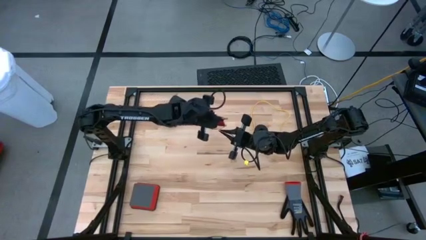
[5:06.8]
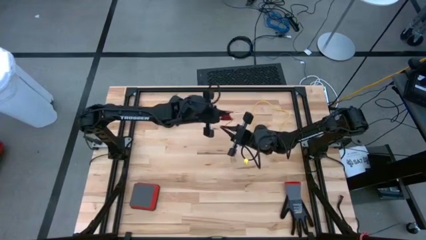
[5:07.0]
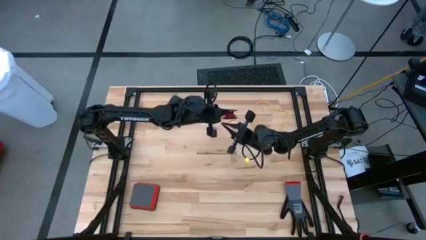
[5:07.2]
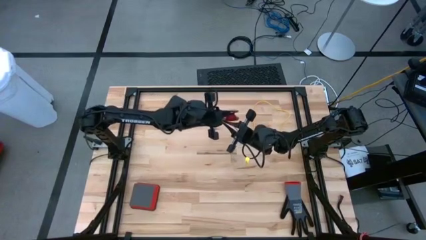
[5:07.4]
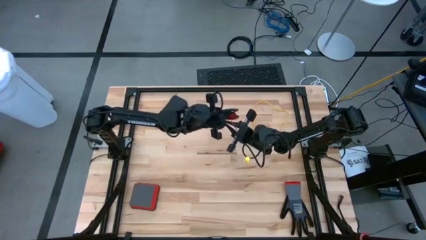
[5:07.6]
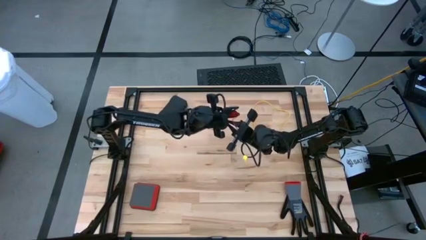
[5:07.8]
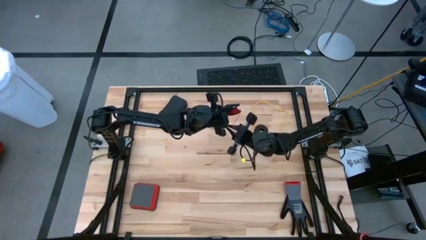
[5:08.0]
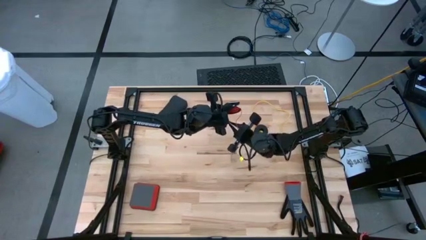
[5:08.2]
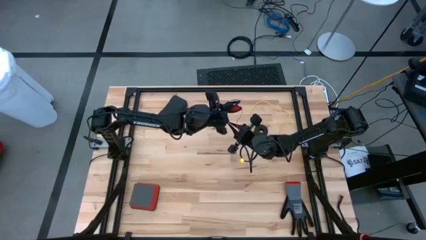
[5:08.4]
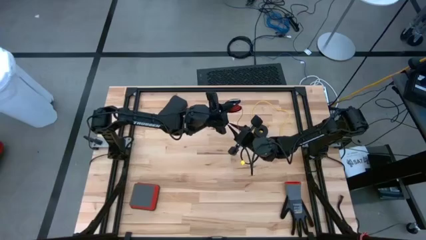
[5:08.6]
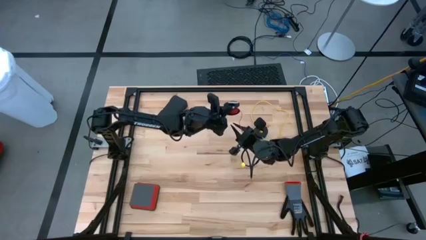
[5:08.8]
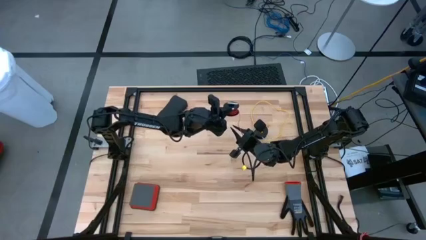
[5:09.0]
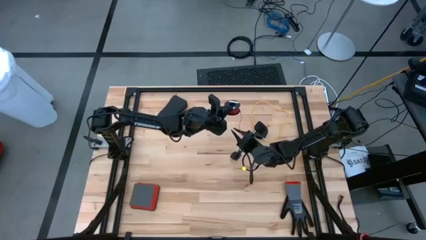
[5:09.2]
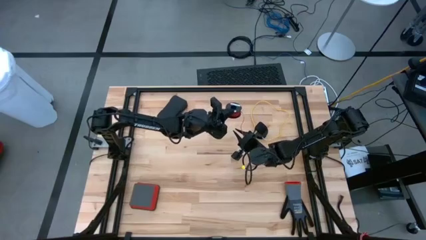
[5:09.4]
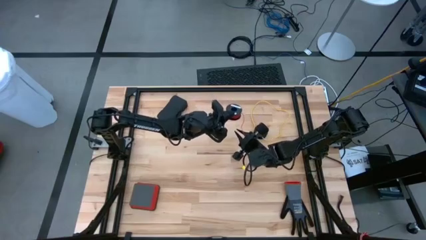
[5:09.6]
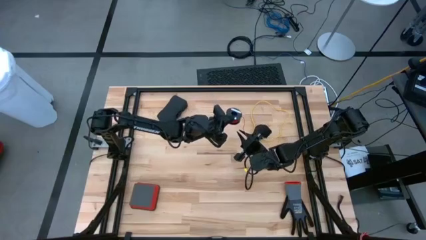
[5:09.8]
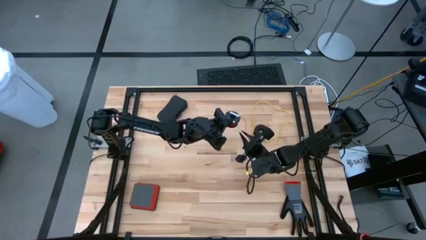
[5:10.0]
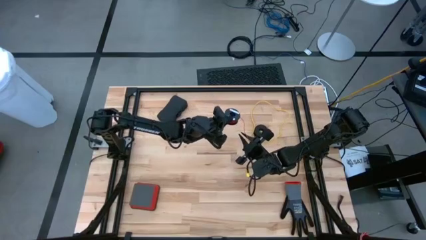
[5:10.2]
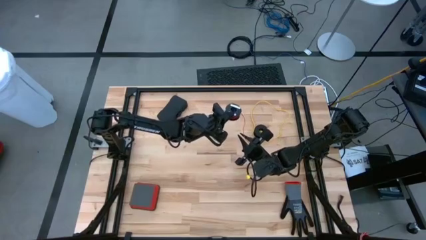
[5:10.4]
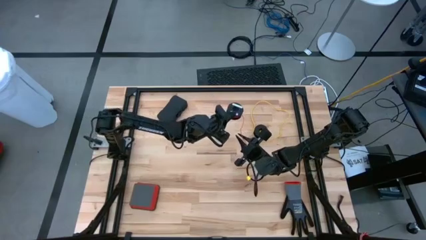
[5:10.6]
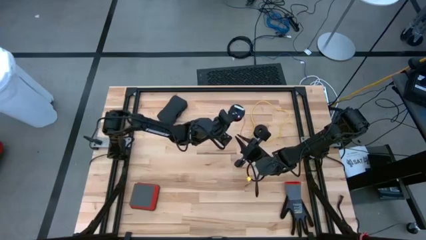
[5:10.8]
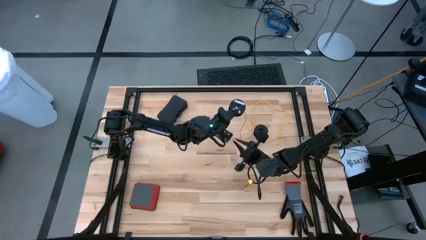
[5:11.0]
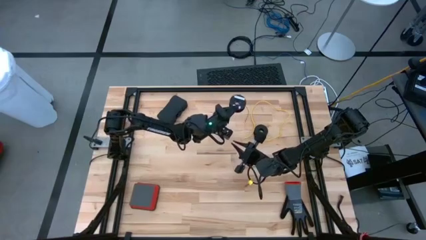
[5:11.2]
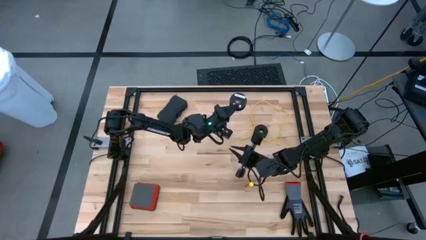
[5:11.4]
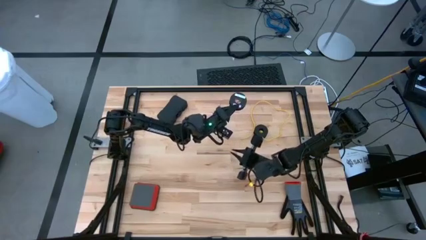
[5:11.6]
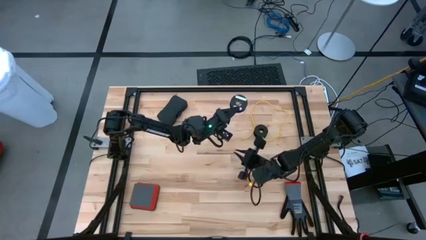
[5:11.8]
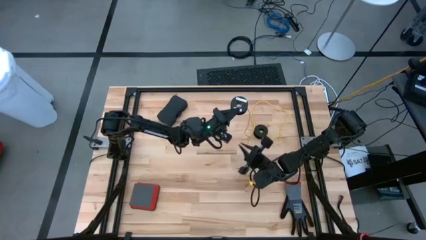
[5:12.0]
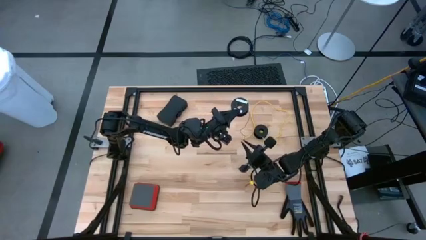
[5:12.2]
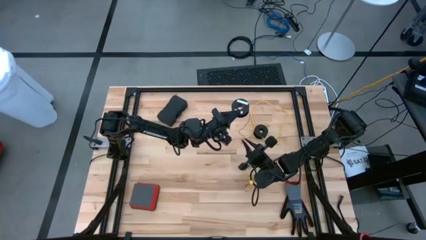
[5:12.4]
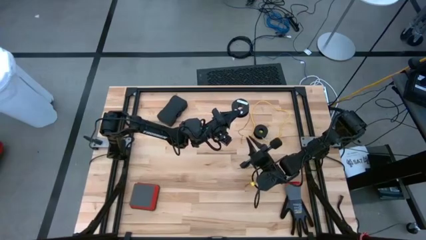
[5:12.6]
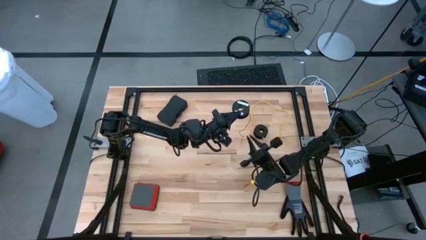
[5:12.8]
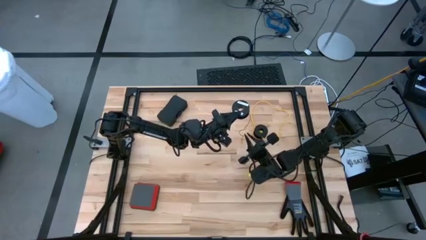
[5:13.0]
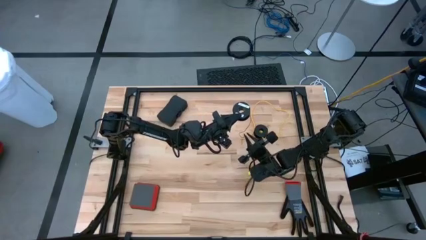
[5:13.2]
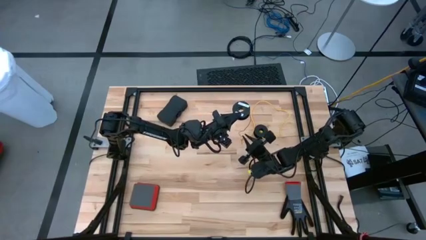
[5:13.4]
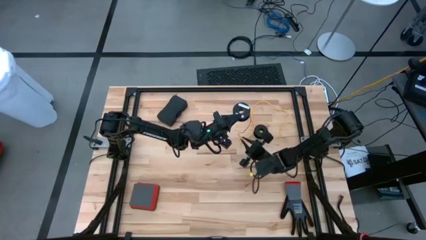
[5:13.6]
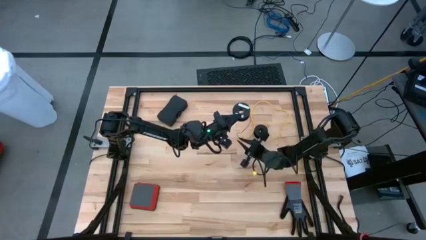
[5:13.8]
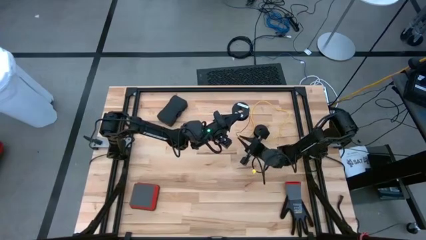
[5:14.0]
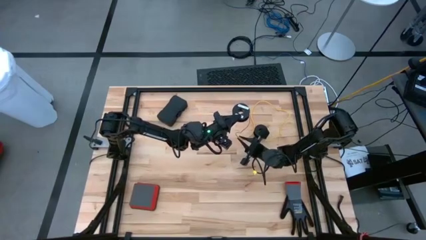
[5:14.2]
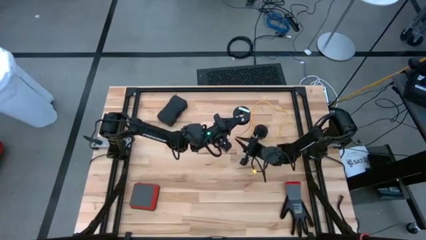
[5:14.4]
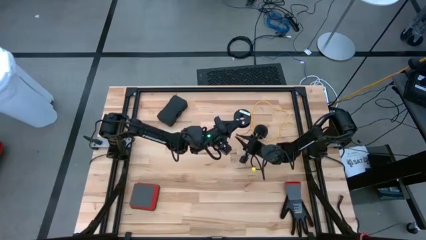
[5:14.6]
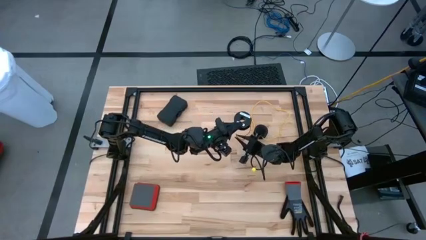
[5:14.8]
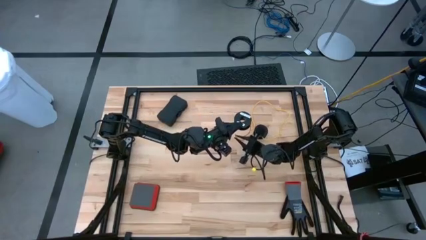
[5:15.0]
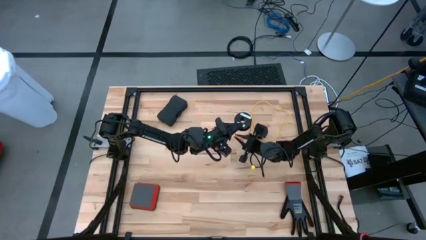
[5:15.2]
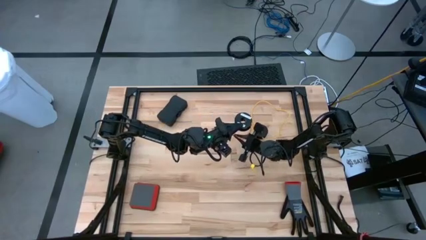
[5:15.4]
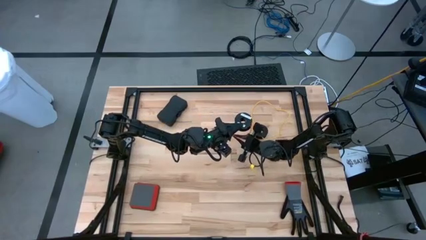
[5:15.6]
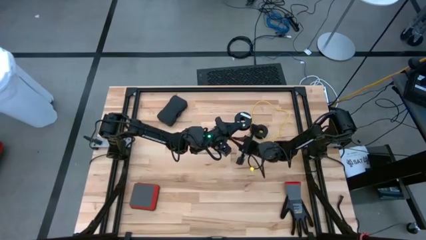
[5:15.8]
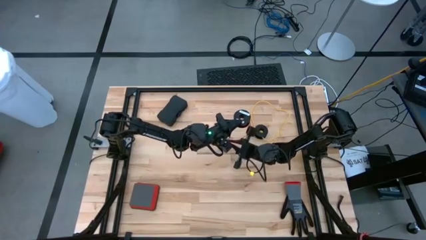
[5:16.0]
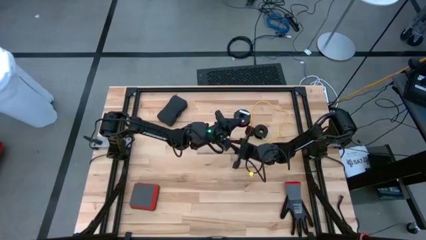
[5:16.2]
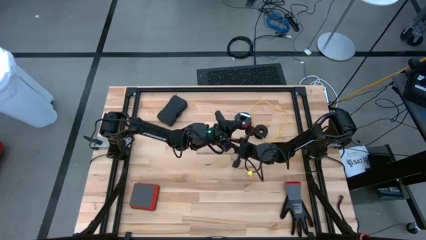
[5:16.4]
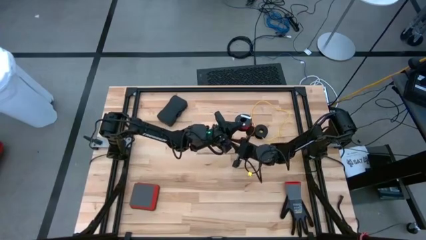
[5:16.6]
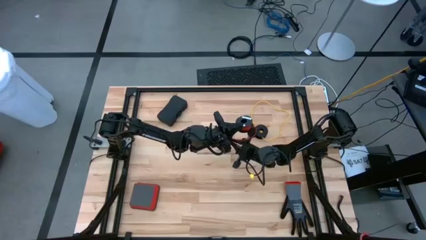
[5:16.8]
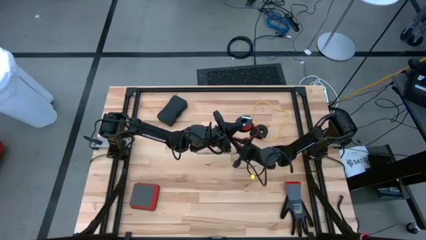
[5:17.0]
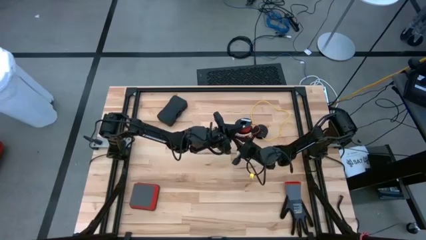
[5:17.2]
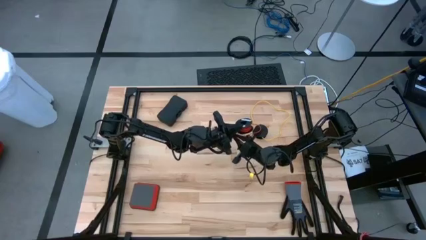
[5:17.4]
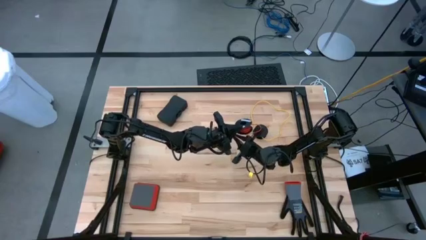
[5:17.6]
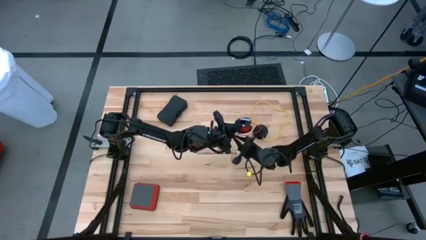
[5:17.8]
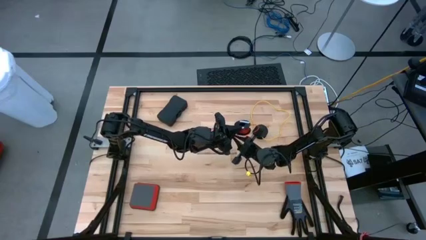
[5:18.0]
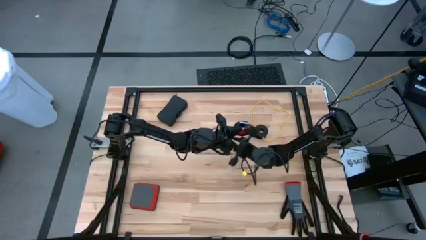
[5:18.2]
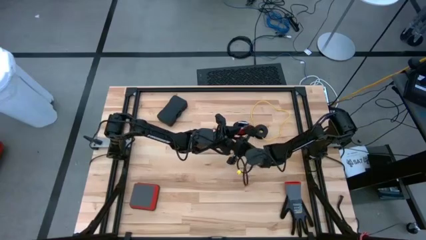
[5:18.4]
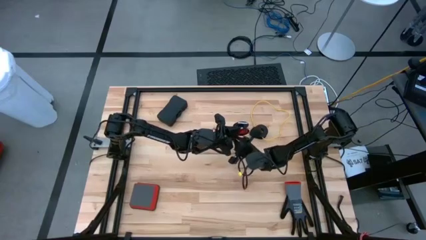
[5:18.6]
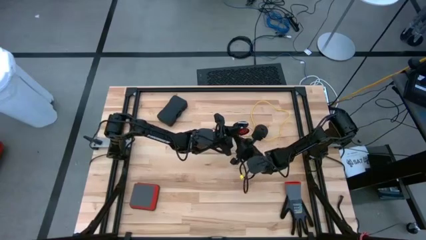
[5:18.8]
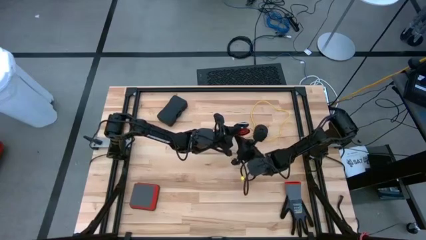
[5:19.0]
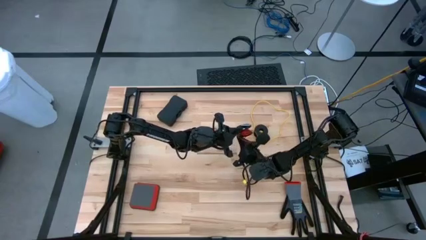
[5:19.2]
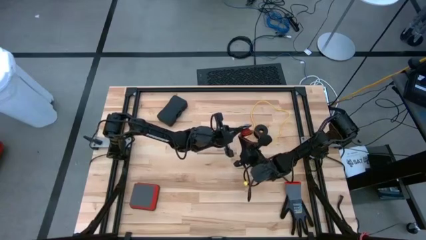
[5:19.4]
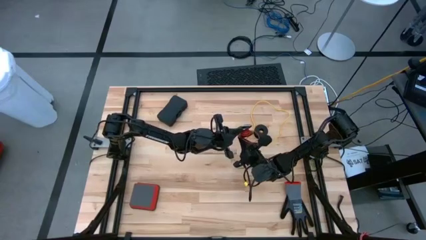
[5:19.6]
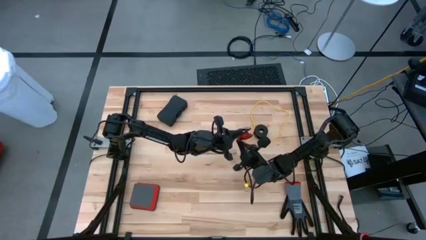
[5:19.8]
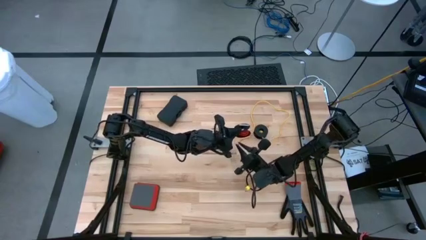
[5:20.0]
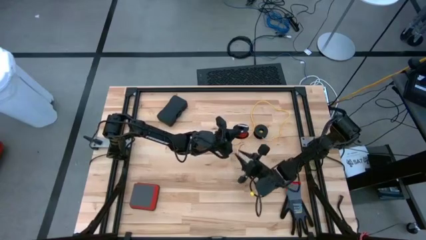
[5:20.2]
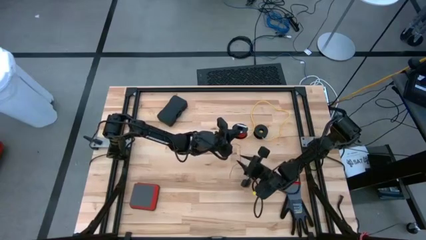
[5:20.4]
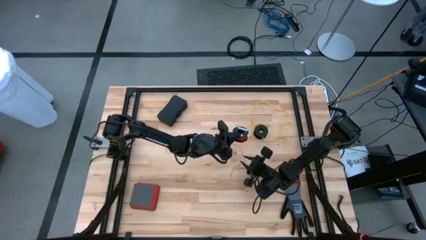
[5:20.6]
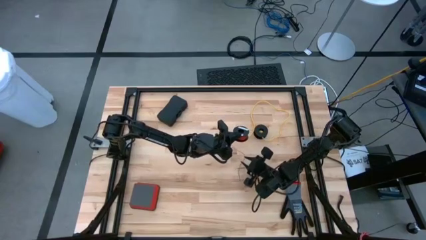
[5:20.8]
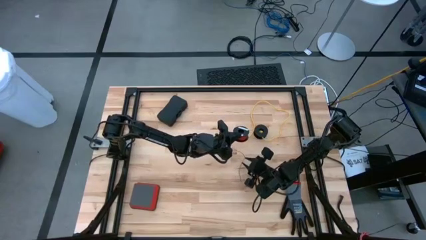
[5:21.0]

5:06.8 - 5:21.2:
Task: Coil cords
Coil the red wire onto the black spool
